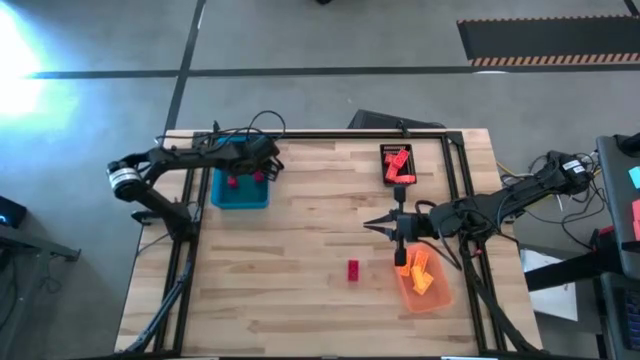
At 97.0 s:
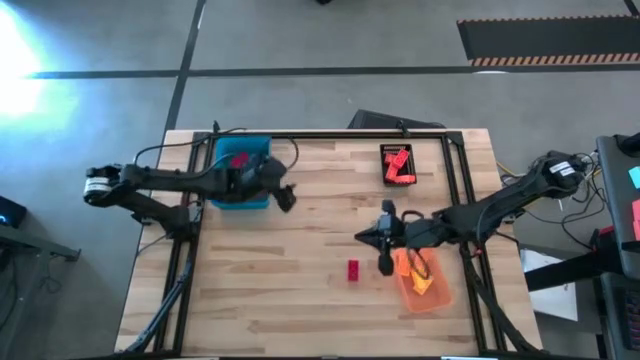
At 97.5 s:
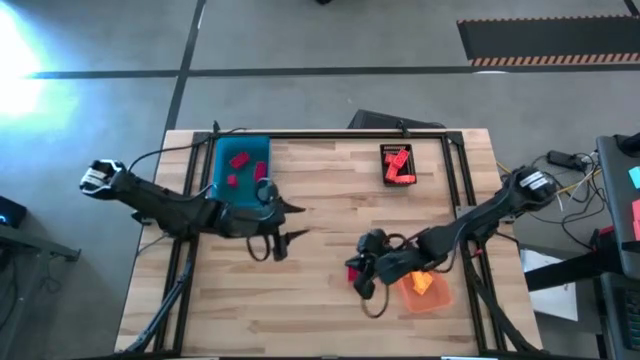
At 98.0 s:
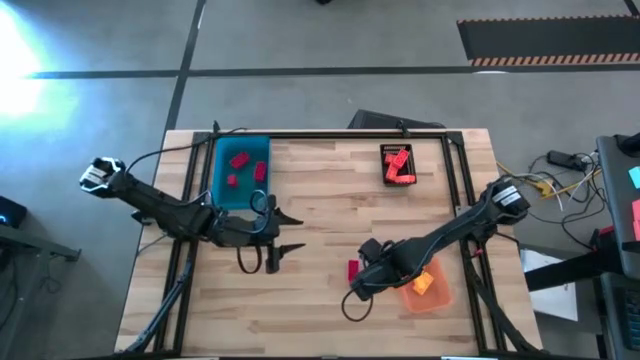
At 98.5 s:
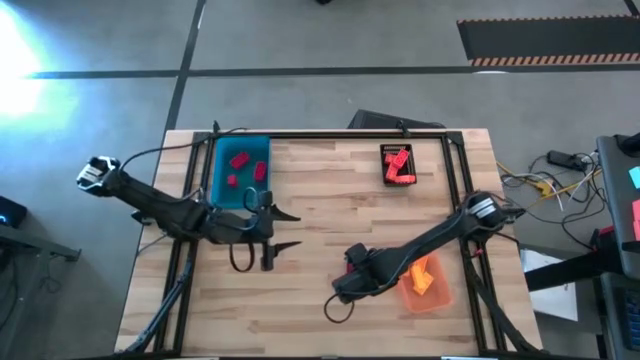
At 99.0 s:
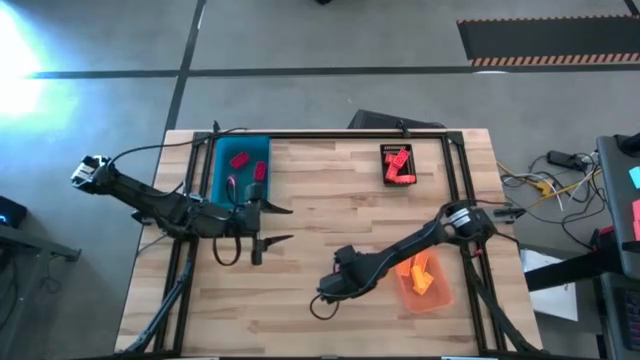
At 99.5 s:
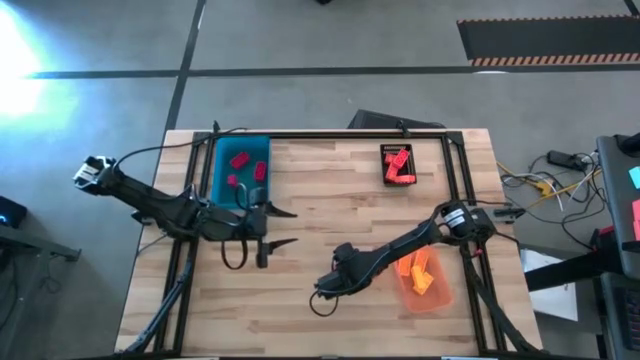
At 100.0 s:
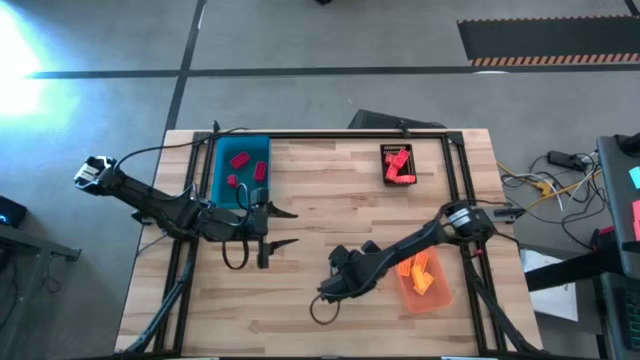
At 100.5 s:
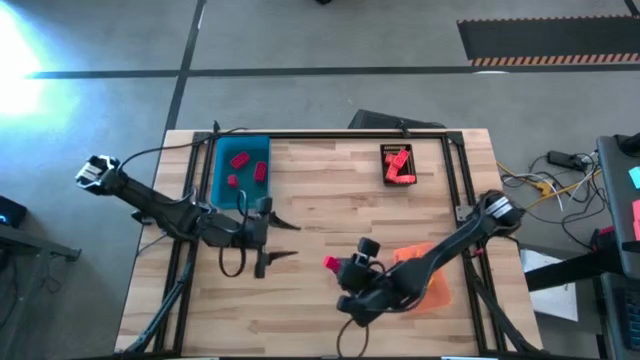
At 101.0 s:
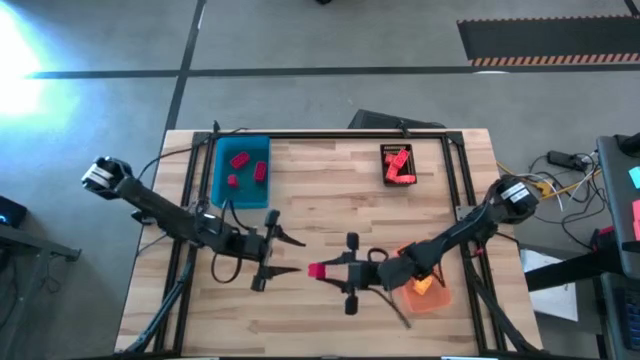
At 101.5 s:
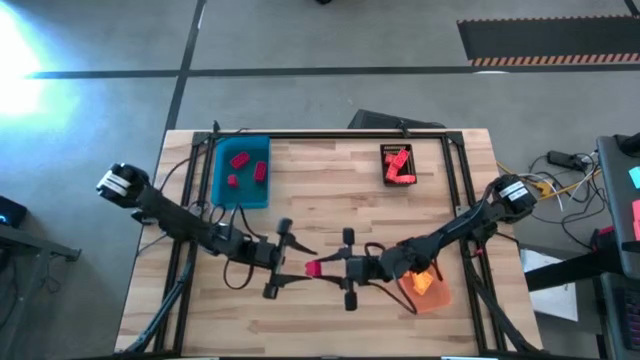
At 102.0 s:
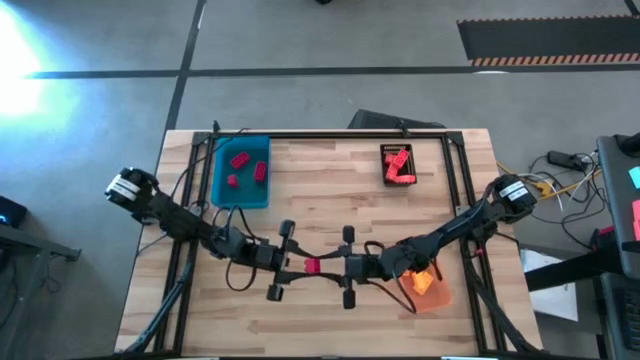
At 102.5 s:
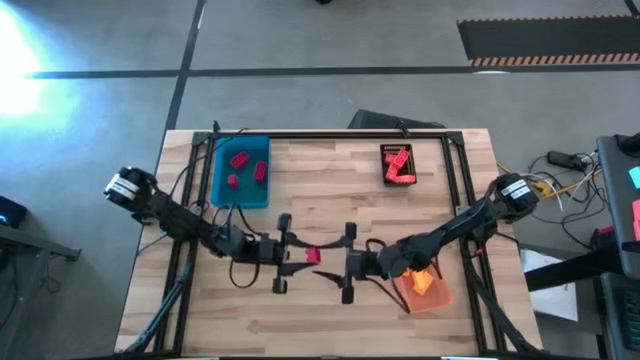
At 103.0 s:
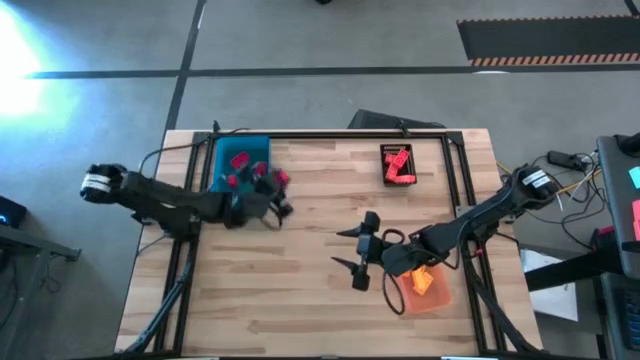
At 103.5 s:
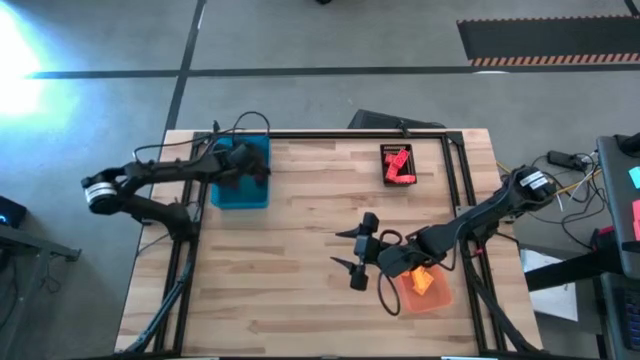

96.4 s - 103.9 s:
Task: Sort & place blocks by color
Put the red game piece into the blue bin

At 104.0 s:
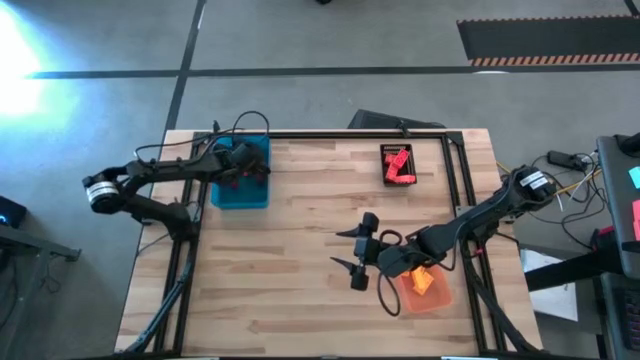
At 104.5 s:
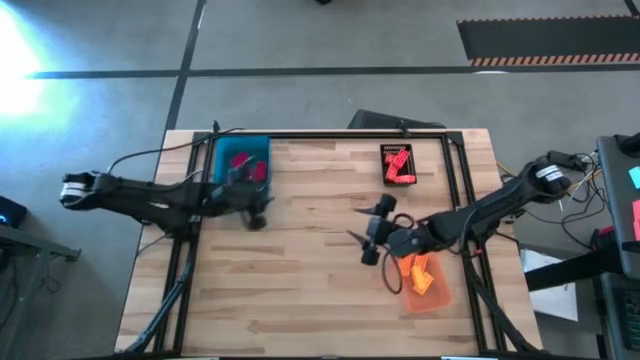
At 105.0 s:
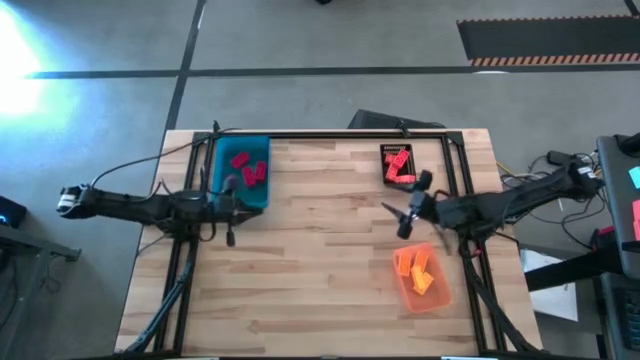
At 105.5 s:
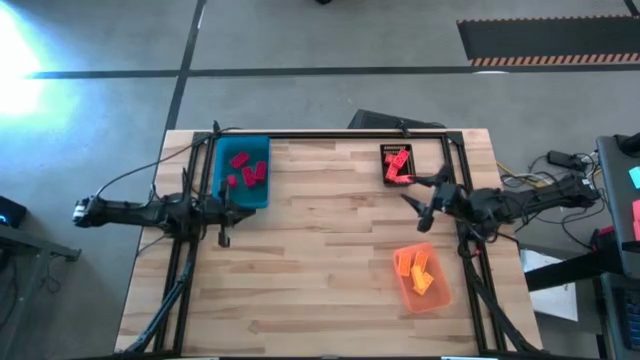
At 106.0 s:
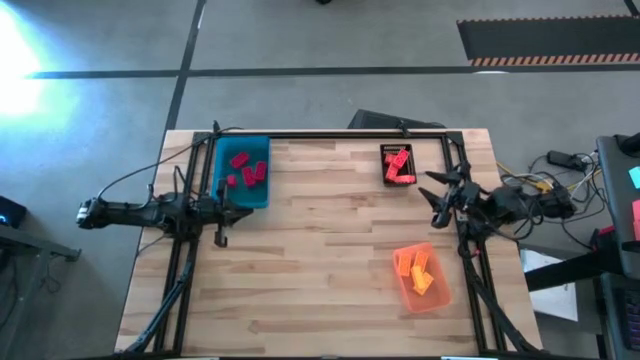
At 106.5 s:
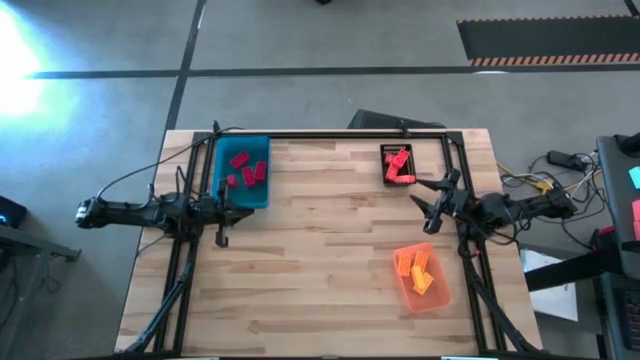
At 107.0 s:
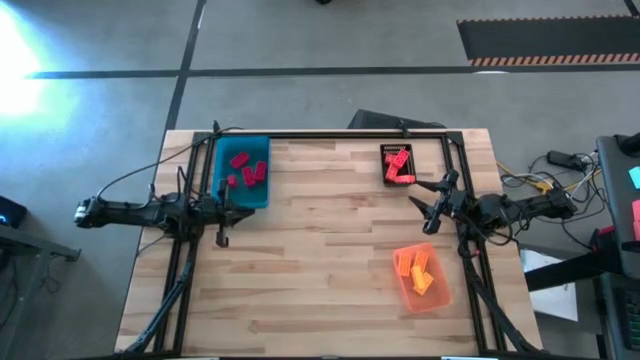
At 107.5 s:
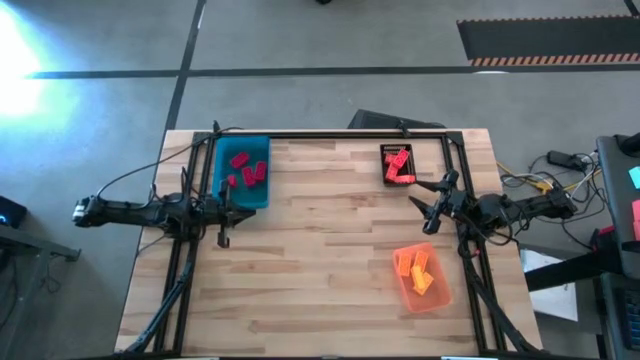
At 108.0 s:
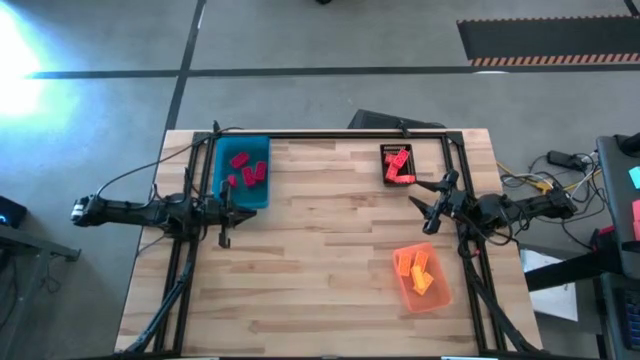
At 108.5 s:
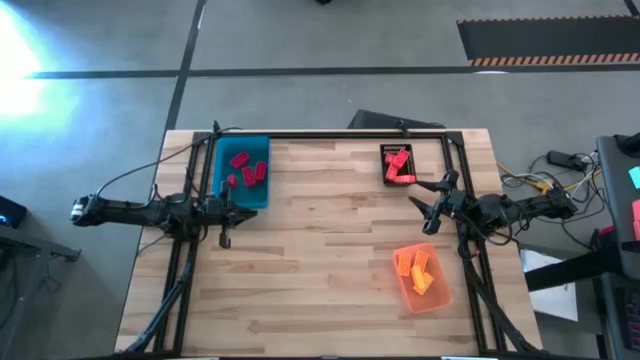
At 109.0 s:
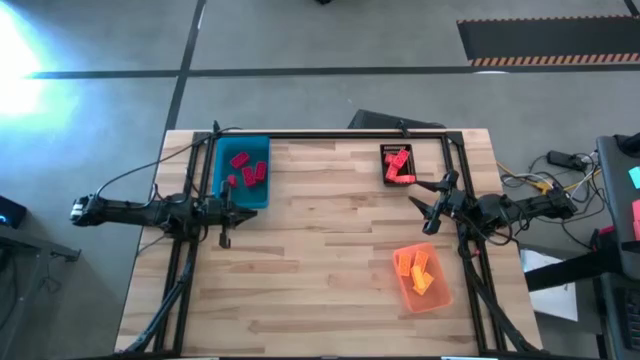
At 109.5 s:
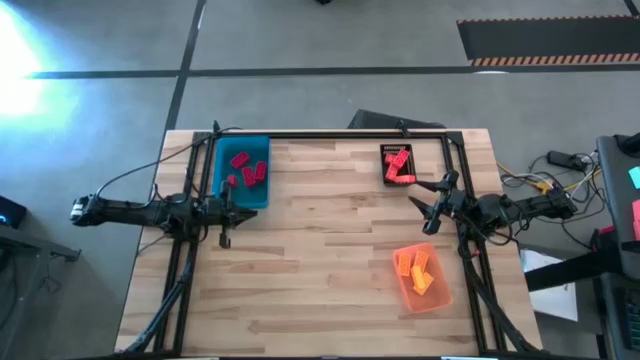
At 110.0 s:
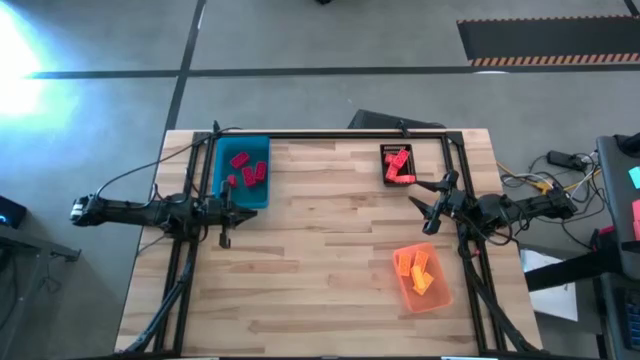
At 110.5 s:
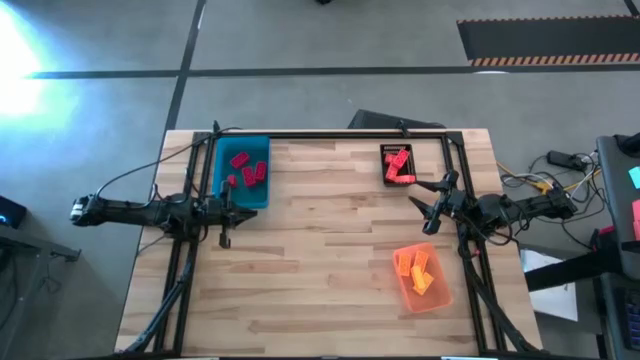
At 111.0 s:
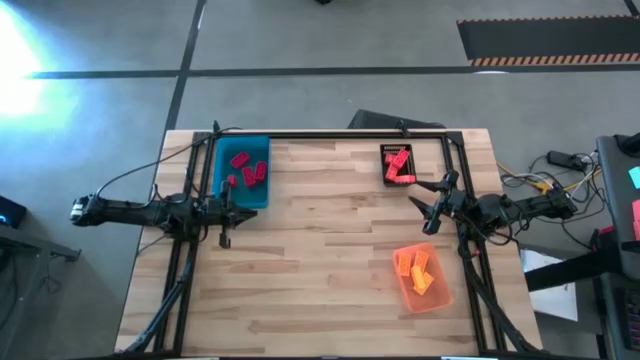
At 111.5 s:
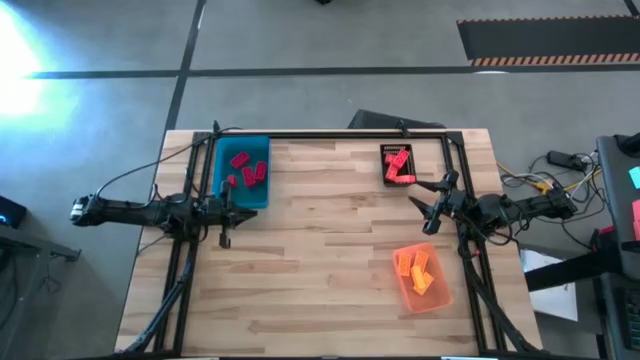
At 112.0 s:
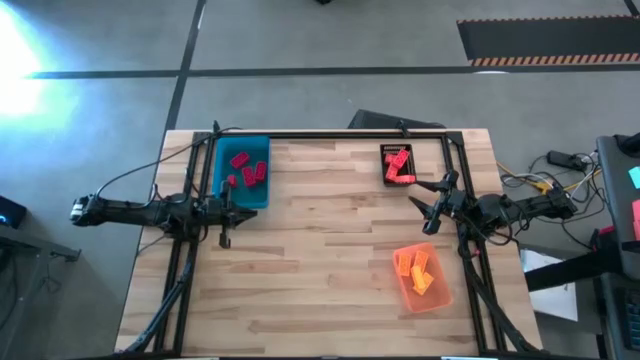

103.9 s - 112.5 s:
Return to Home Position

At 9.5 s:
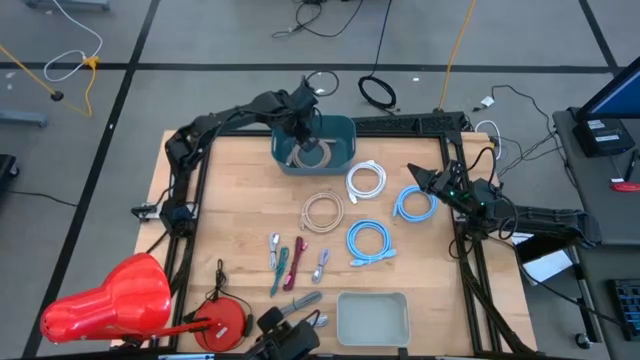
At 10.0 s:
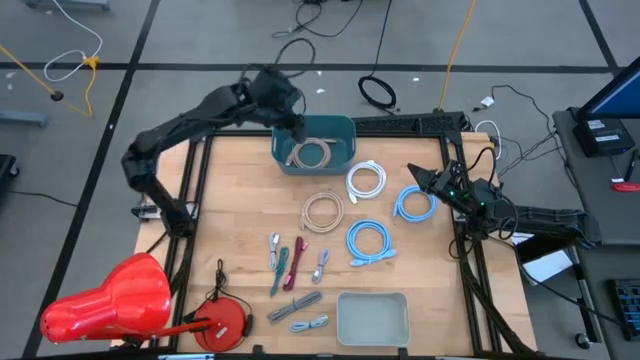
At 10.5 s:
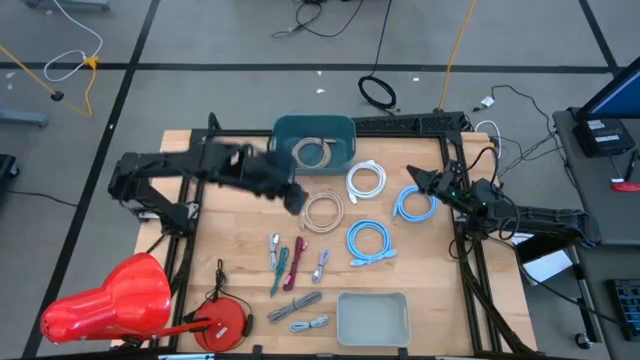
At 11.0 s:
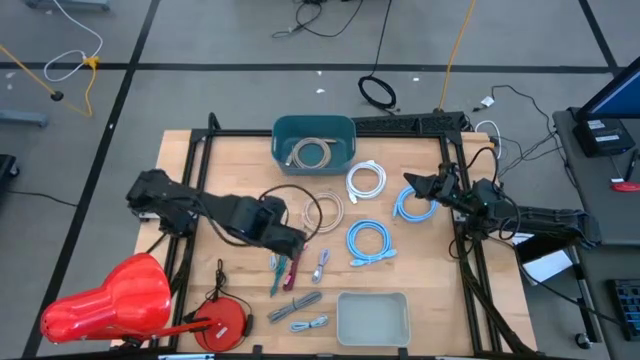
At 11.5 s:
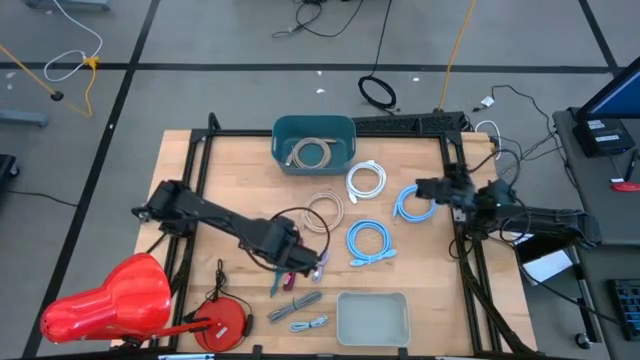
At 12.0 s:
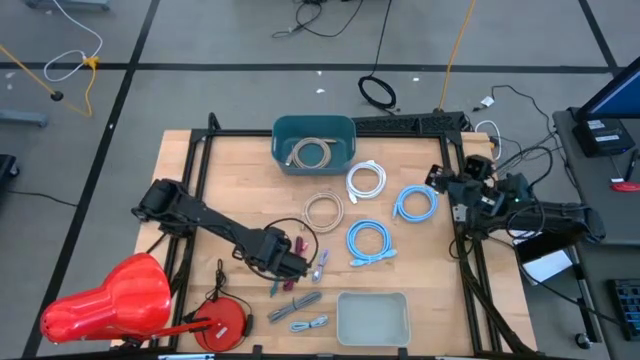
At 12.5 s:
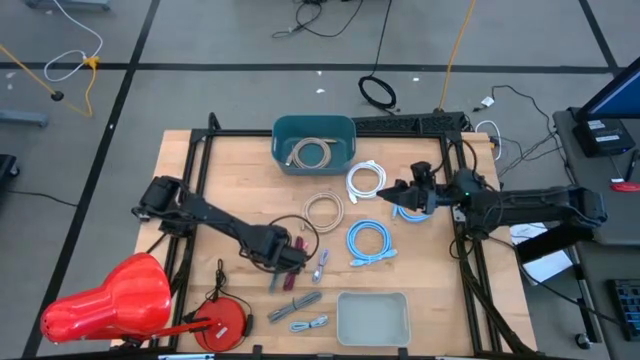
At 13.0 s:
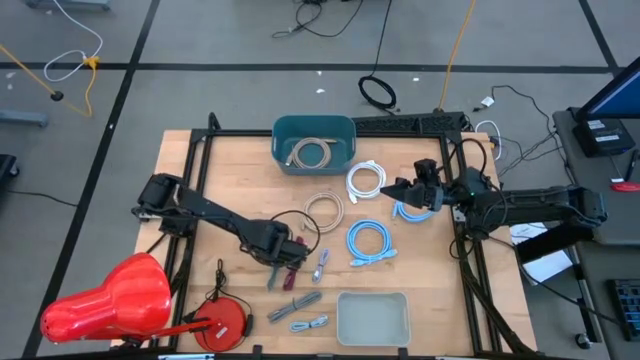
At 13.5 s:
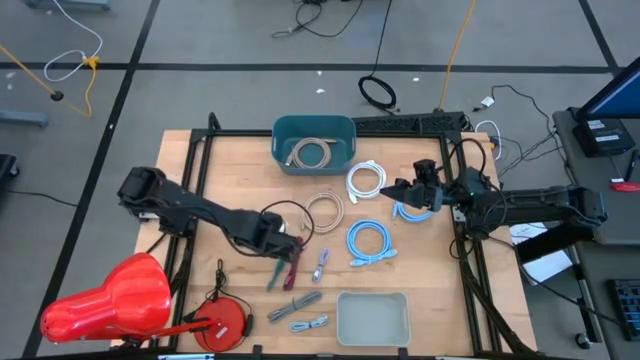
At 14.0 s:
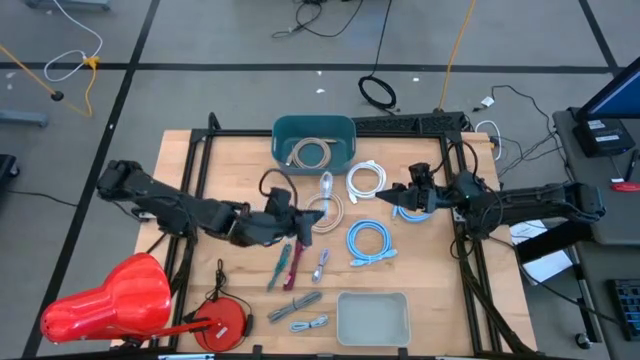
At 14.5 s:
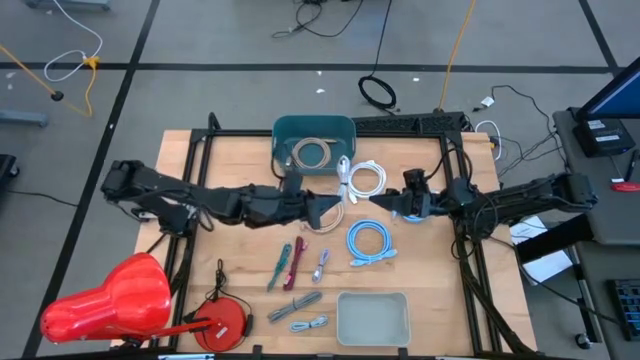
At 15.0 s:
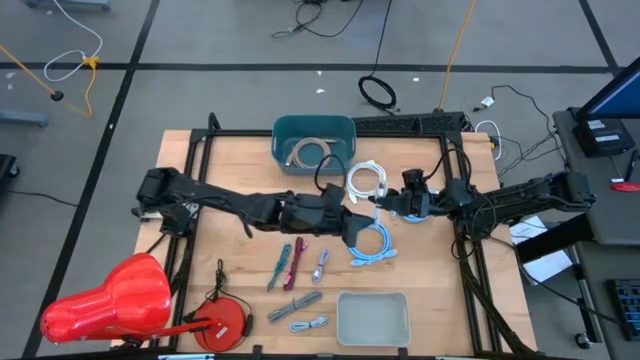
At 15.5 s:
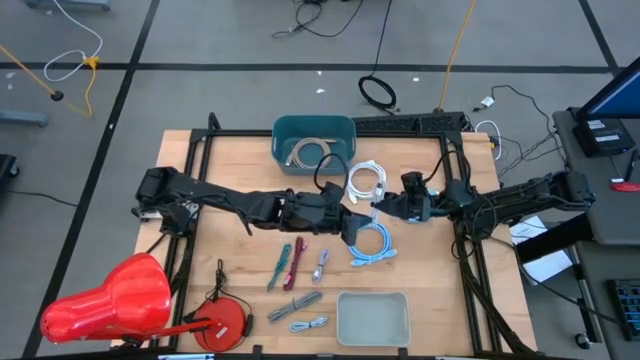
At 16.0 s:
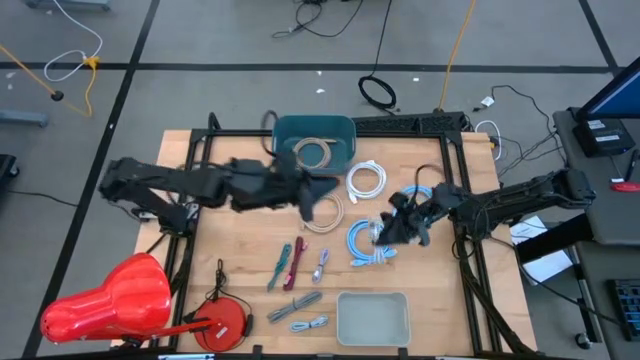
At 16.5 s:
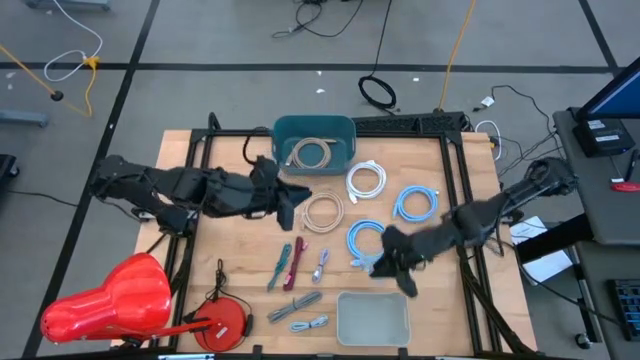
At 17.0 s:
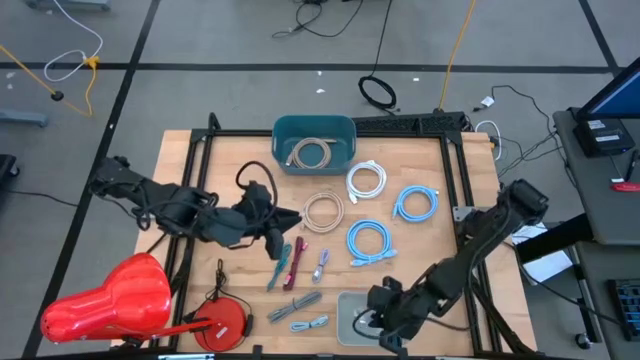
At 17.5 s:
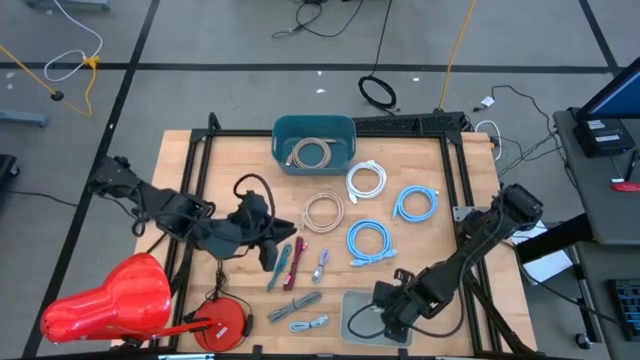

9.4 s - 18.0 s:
Task: Pick & Place USB Port
Put the white charger cable into the gray bin
